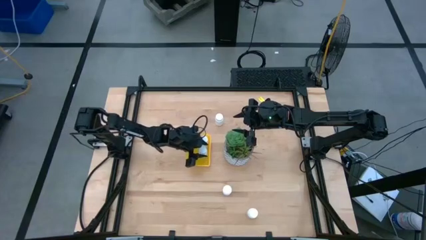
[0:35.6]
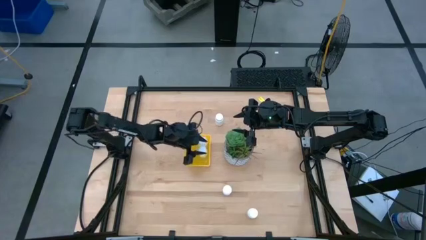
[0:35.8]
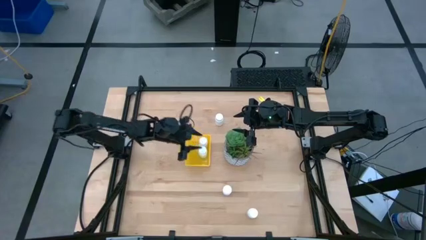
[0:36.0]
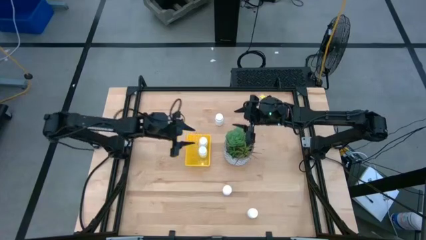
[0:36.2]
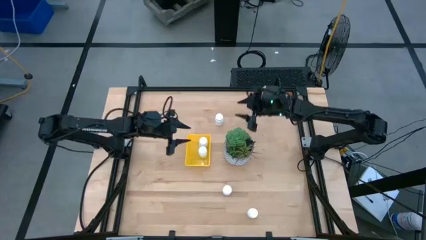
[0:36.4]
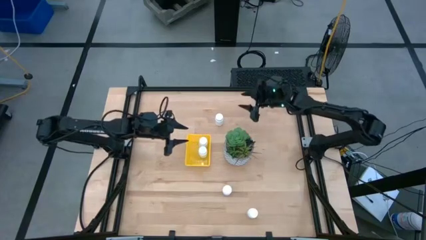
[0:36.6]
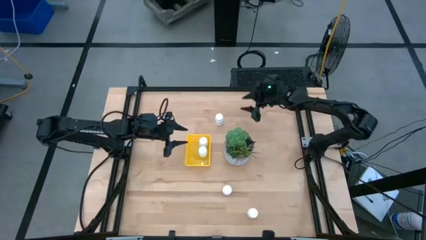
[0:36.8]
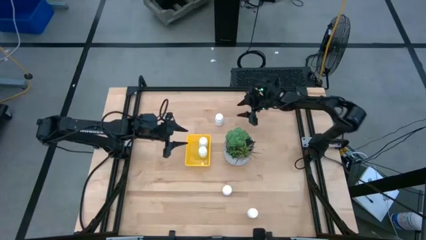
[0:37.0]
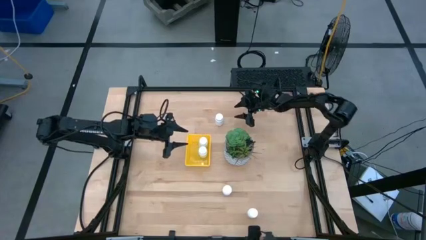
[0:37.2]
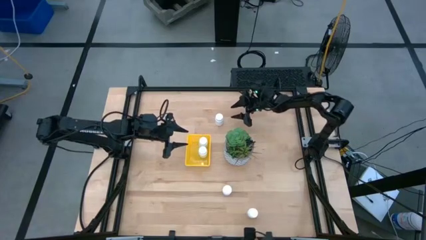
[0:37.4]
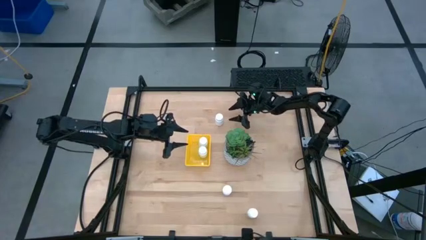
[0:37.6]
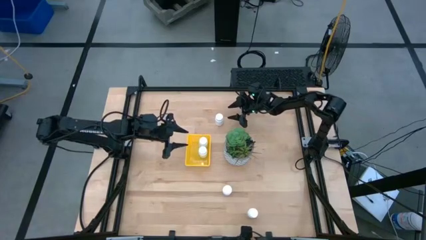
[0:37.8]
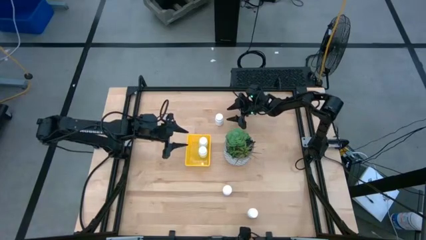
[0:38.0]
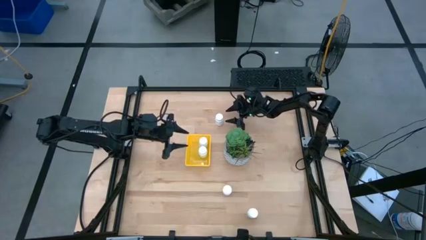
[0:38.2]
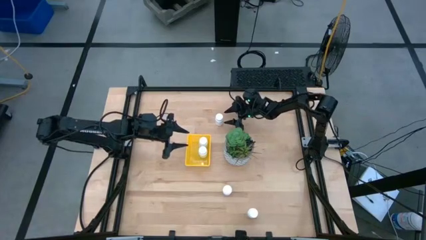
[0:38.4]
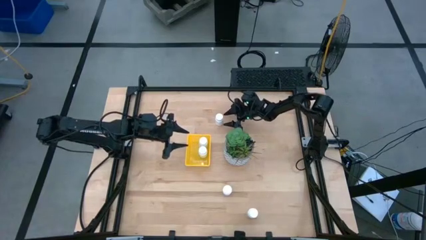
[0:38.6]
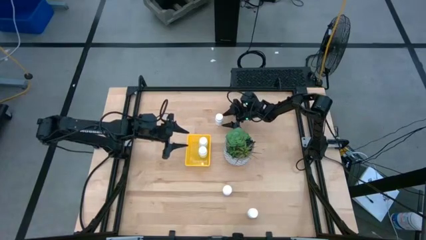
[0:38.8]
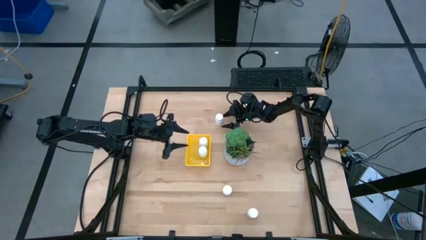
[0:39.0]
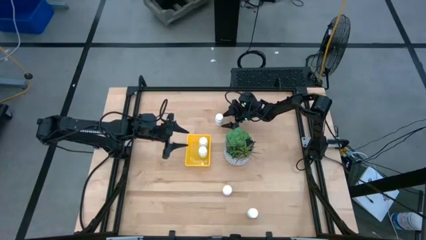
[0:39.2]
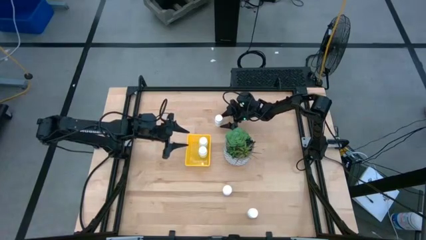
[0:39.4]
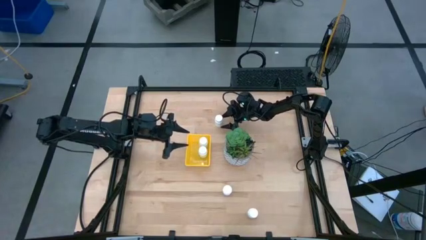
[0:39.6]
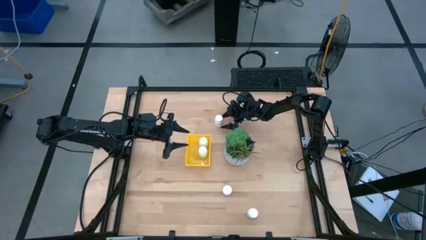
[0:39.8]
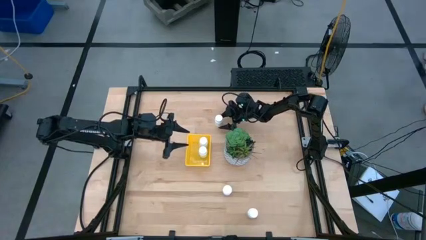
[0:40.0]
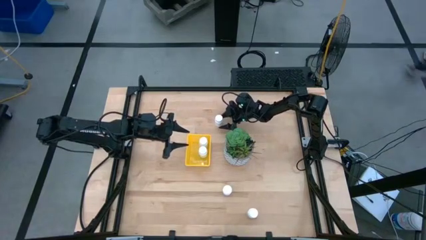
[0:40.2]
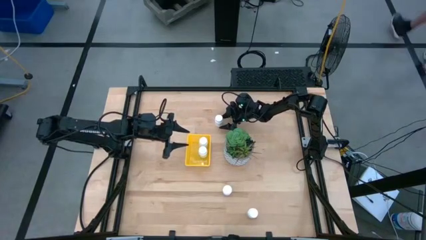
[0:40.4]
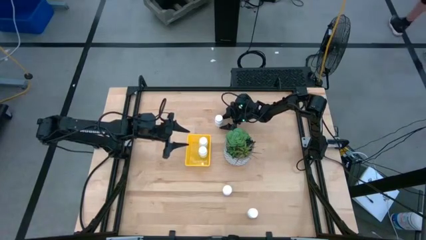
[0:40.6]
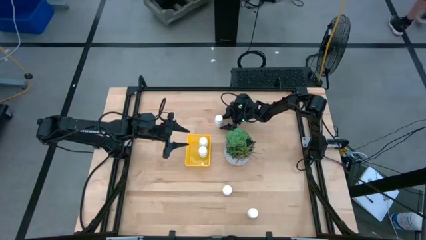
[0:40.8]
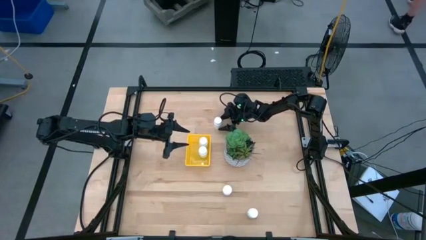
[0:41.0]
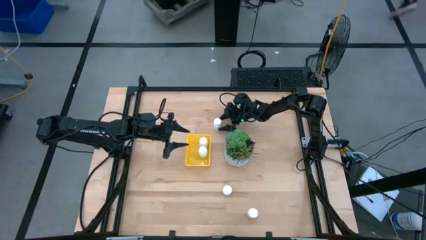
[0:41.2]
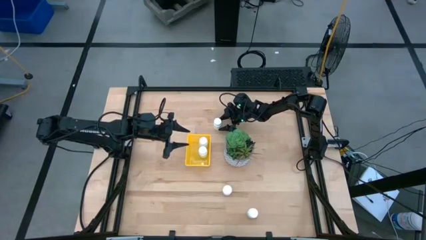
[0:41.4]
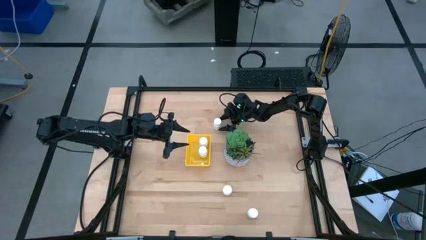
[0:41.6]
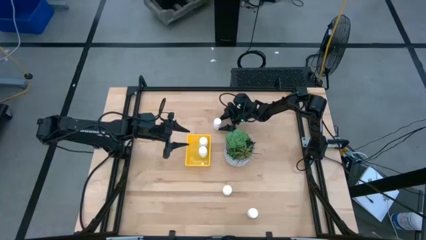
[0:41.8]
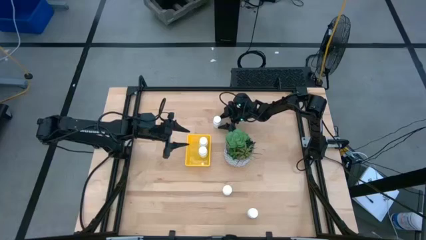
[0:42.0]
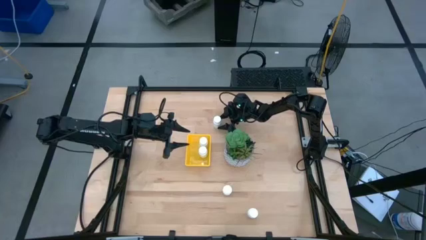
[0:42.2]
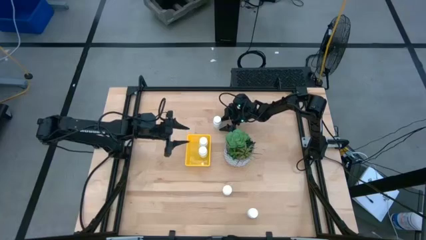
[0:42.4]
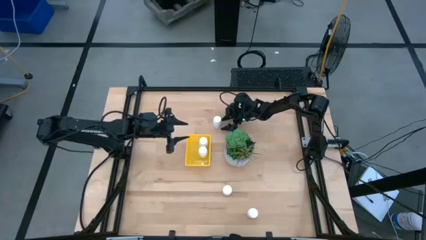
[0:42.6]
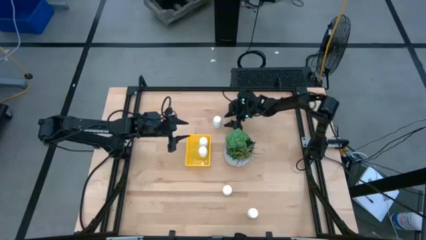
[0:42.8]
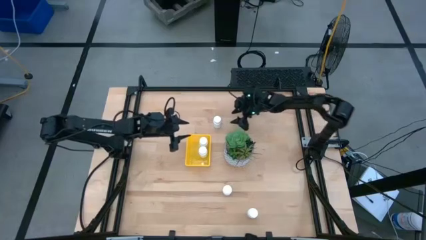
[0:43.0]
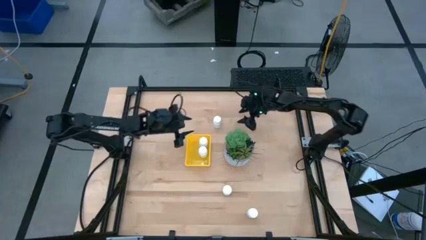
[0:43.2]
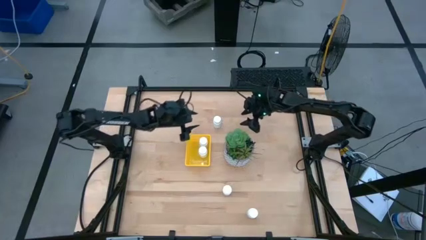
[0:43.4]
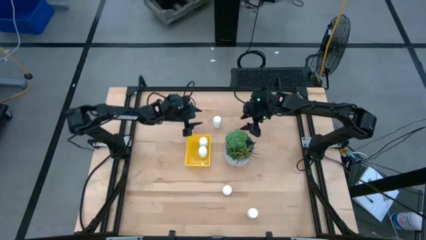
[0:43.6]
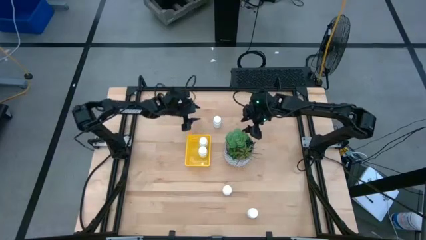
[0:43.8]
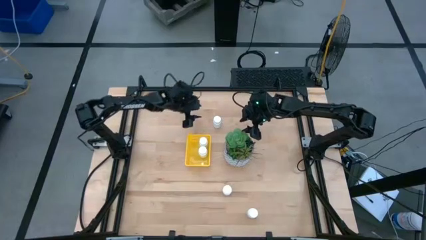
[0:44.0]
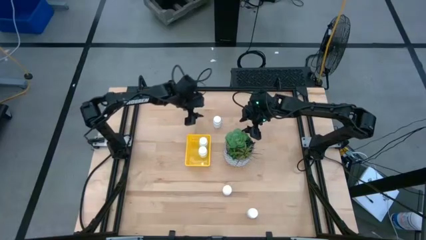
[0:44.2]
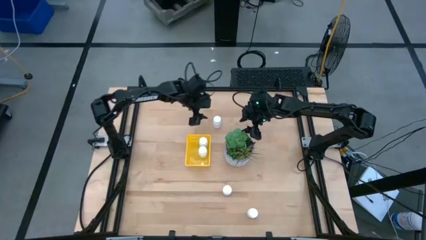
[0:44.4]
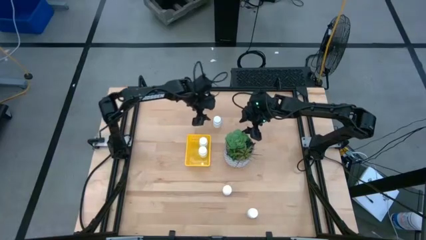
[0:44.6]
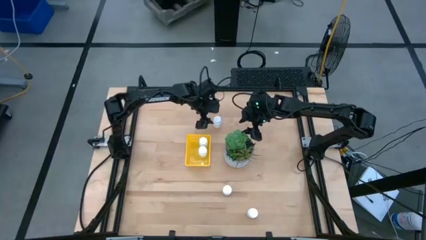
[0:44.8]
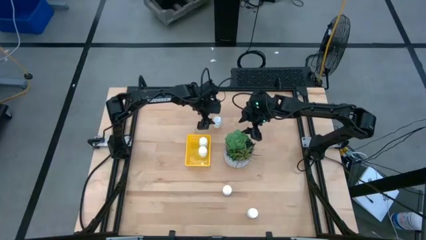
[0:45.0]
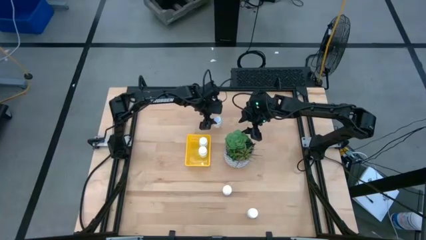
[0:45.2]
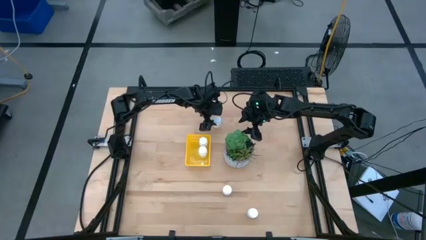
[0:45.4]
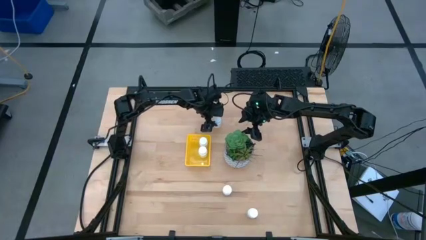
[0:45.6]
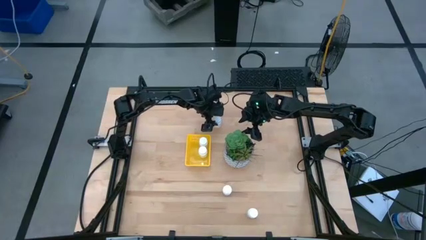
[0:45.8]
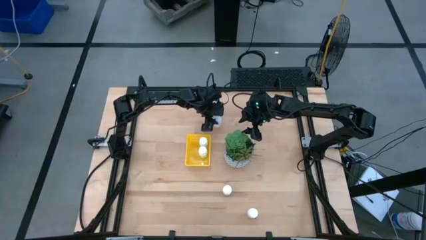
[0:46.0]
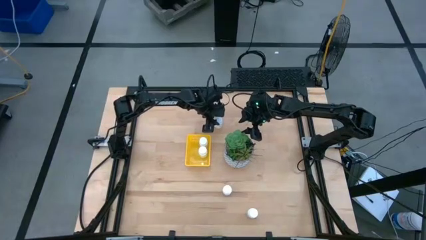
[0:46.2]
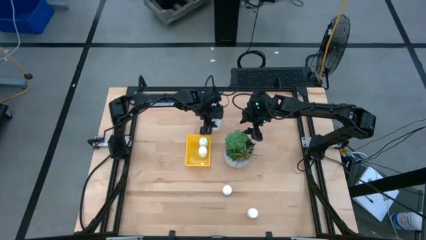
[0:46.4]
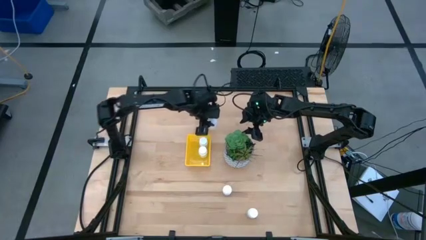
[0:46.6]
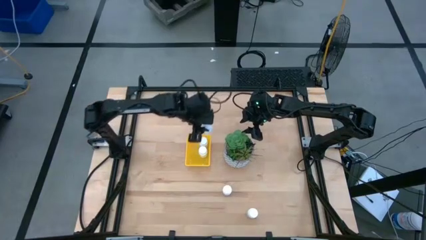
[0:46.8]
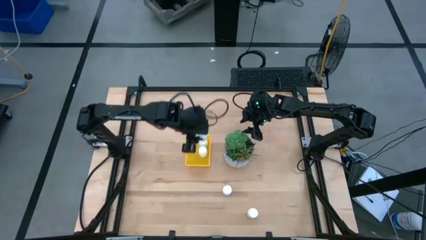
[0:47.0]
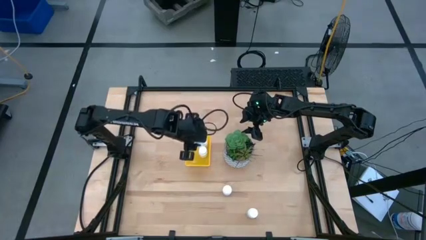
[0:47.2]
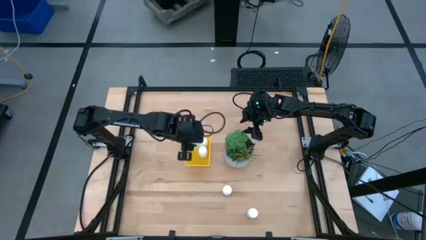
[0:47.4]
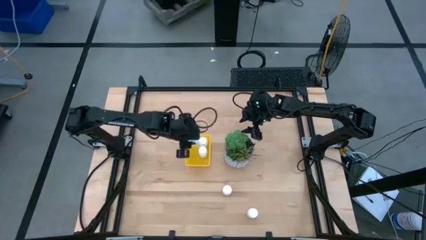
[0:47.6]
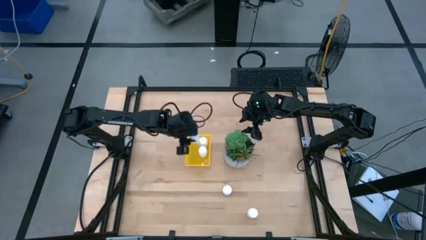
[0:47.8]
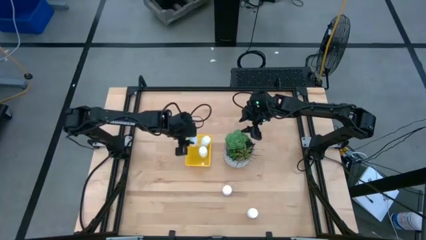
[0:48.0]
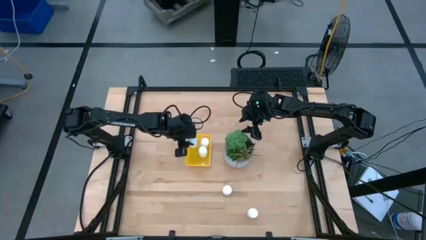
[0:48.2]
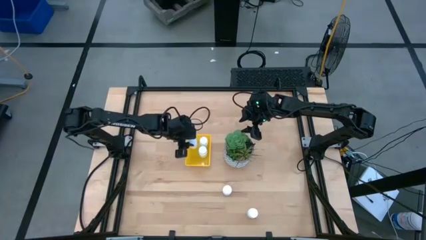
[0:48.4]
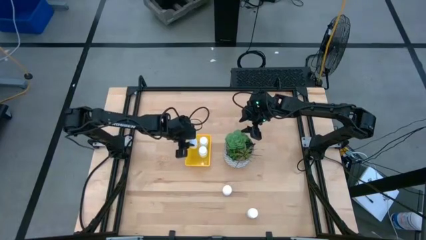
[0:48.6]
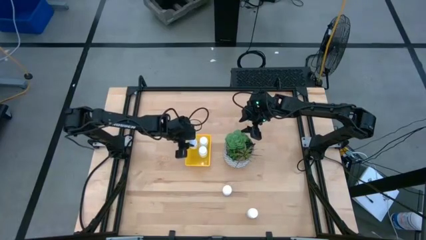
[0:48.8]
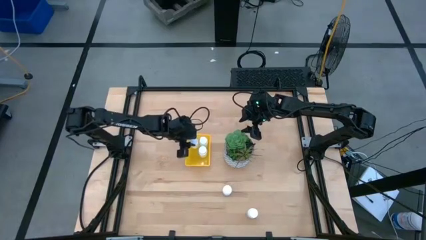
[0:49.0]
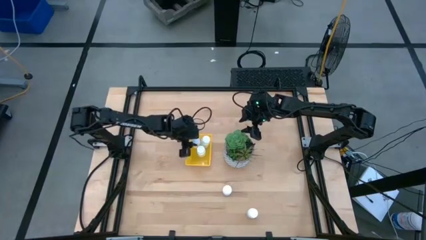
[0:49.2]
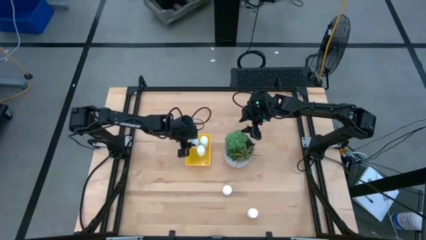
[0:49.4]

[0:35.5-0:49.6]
Task: Pick and place pill bottles into a basket
Put the white medicine bottle into the yellow basket
